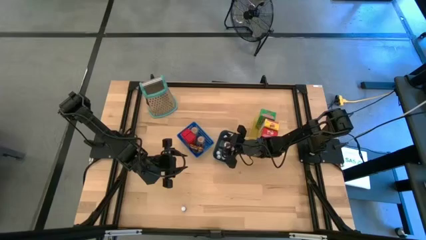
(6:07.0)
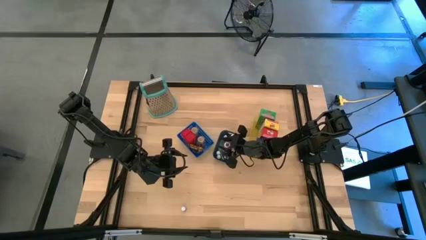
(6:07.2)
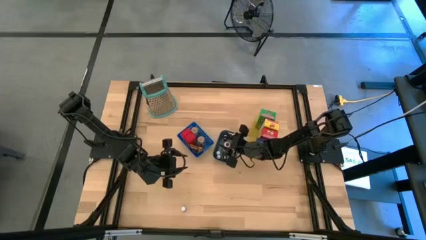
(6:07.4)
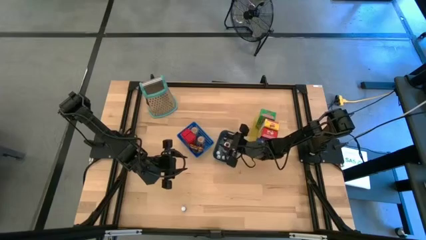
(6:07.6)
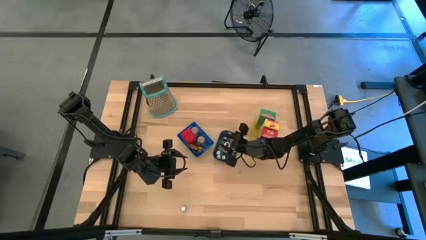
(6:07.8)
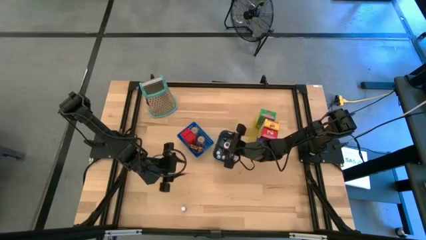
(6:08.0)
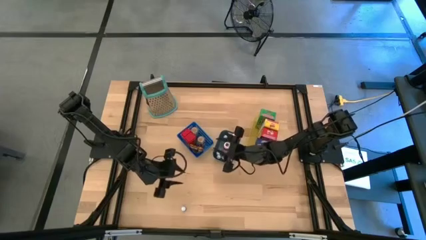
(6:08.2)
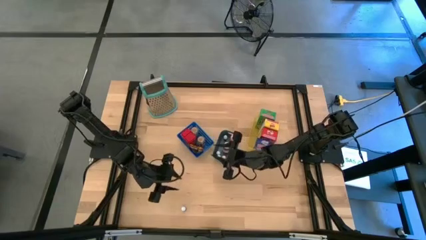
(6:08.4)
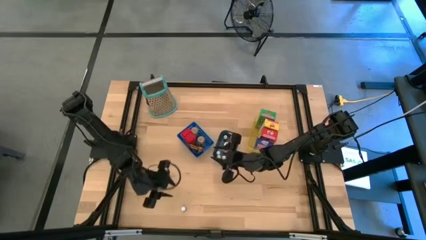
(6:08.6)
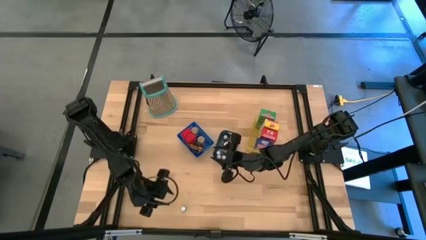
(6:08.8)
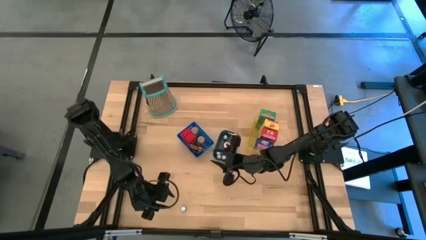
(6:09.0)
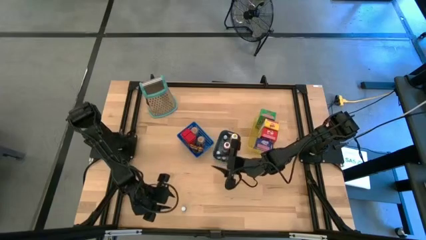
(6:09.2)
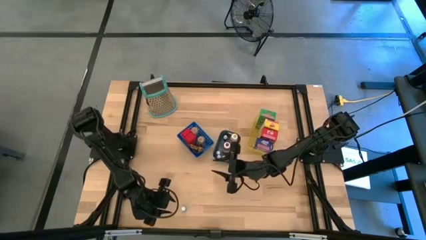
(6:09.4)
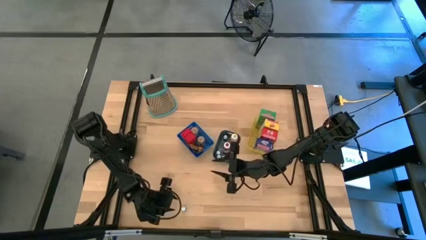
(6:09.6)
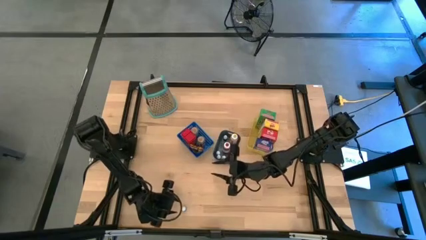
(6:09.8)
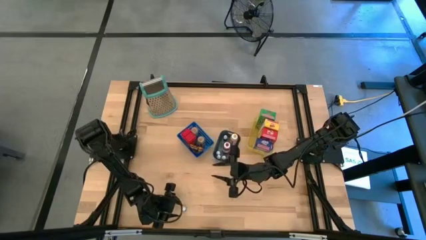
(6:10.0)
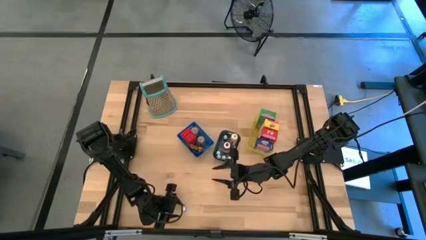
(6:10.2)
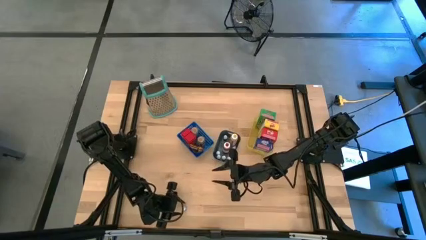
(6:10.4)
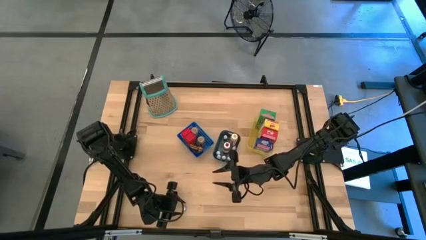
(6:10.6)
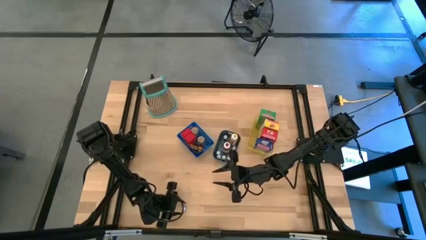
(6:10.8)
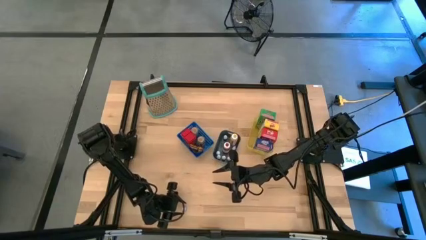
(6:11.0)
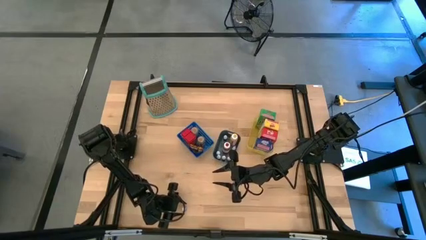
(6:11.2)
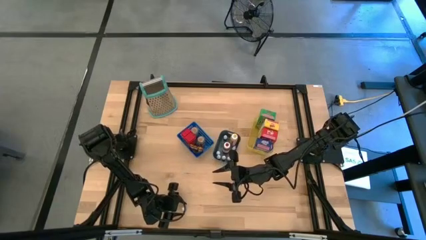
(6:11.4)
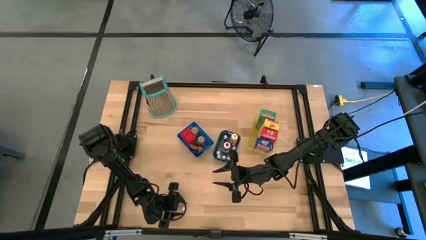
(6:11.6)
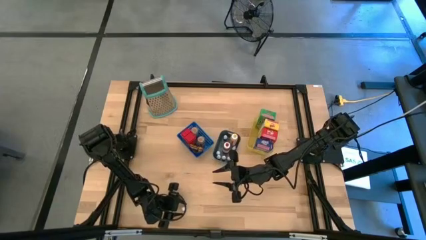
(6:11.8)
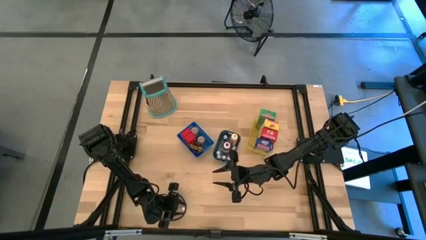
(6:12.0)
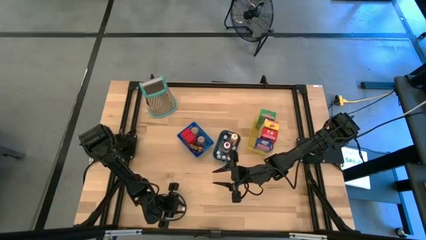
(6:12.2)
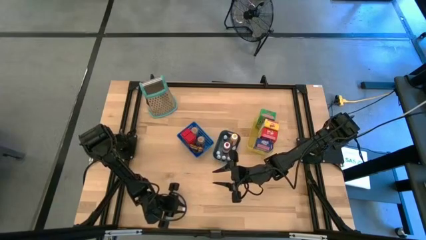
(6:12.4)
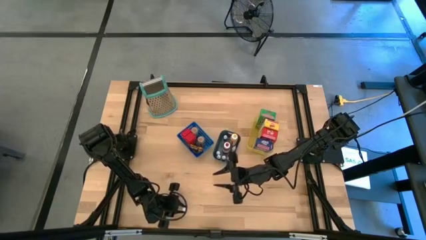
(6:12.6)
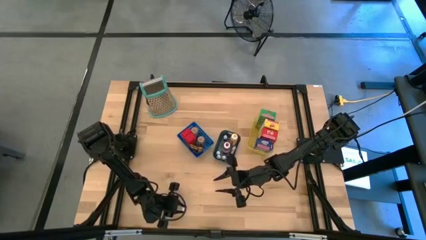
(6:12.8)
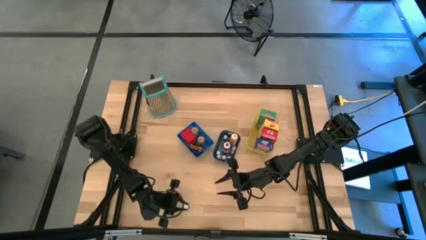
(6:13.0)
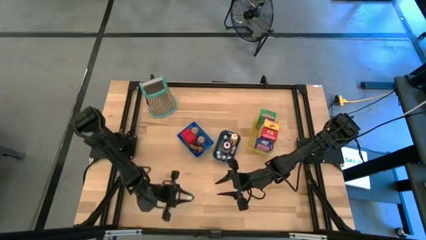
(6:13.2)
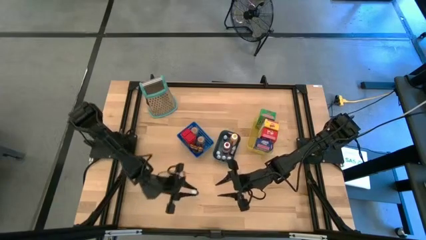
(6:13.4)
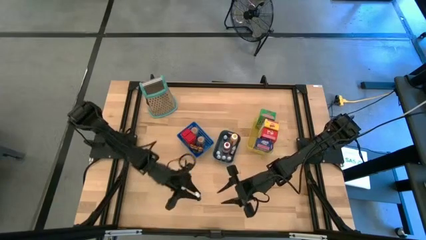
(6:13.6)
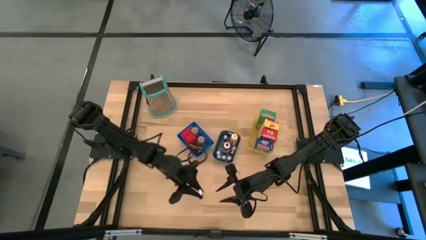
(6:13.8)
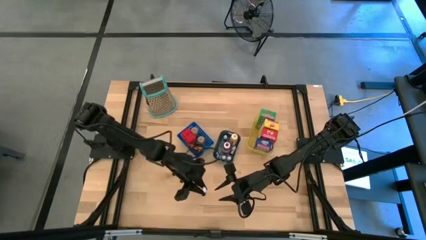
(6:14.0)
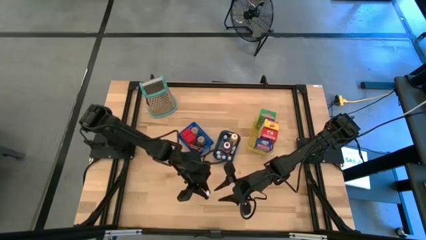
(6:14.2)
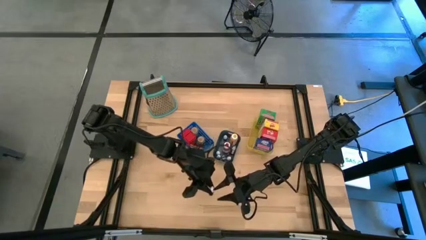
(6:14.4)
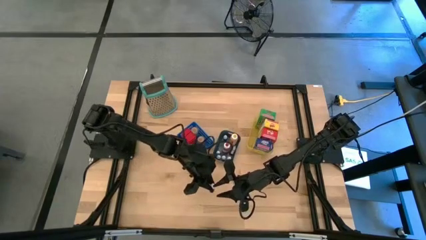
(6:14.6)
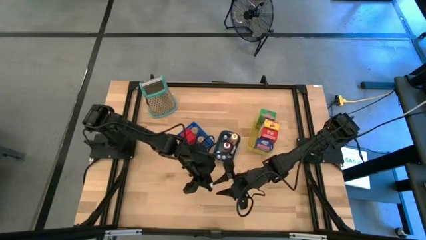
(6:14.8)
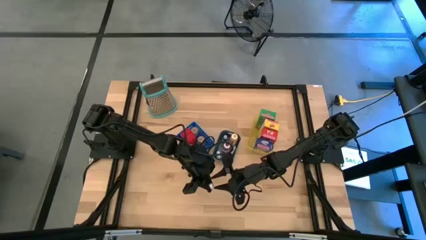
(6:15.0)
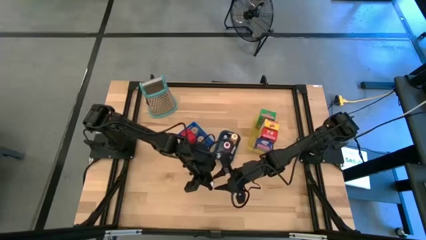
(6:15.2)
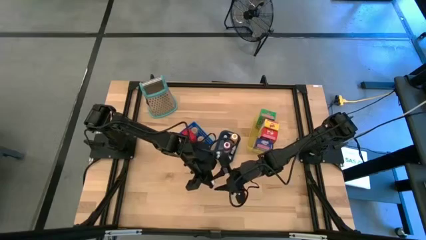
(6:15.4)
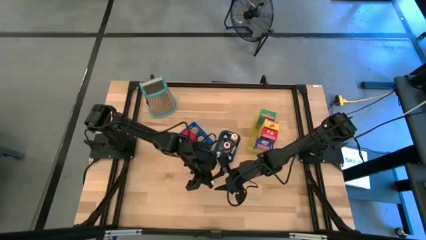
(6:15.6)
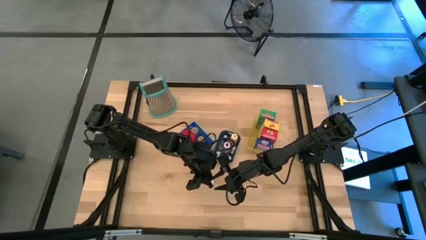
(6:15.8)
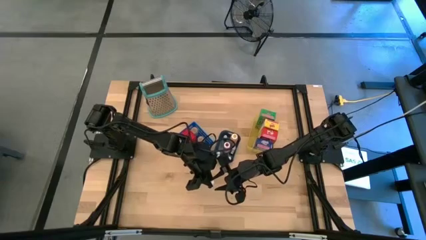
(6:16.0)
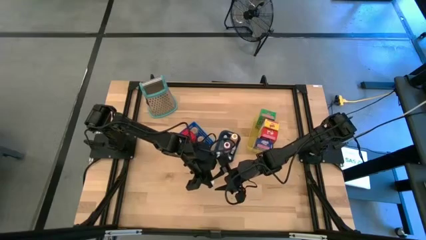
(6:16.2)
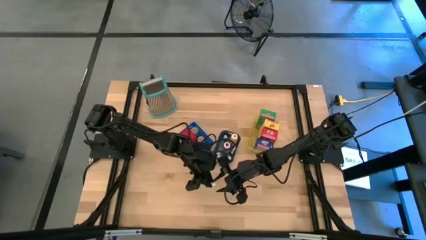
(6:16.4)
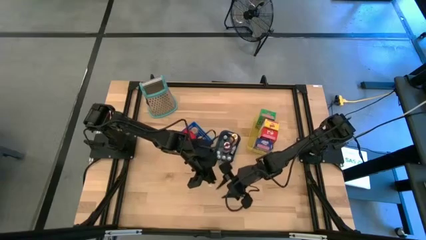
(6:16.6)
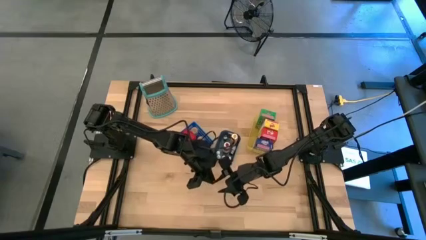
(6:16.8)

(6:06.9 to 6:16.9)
Task: Pick & Place Kitchen Items
Put the green food coloring bottle into the green bin
